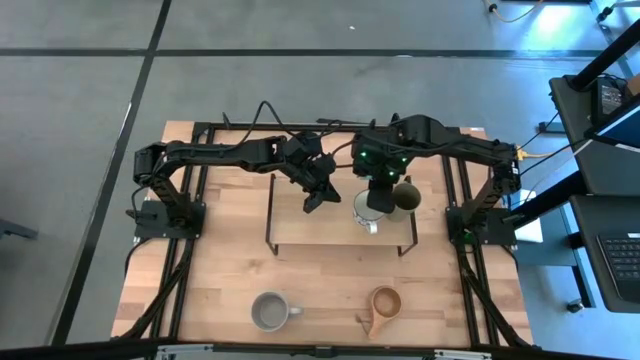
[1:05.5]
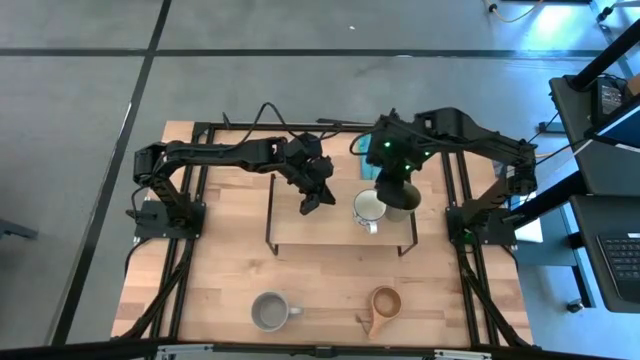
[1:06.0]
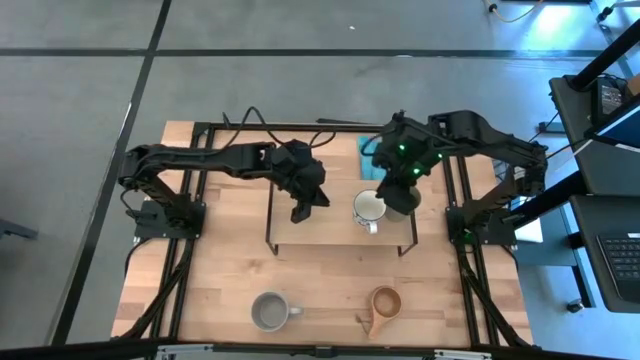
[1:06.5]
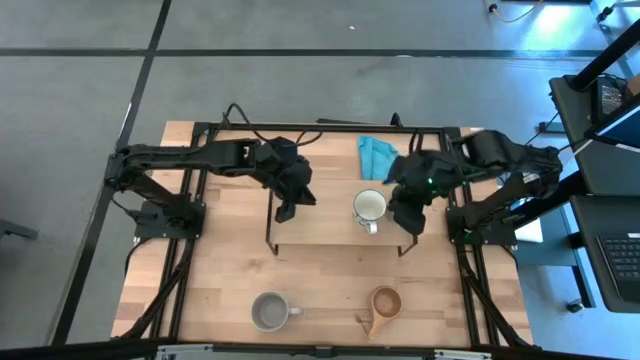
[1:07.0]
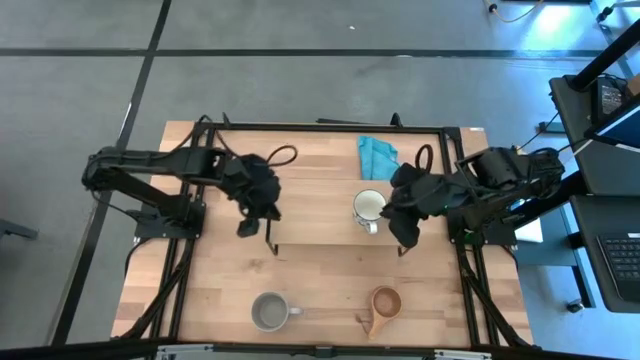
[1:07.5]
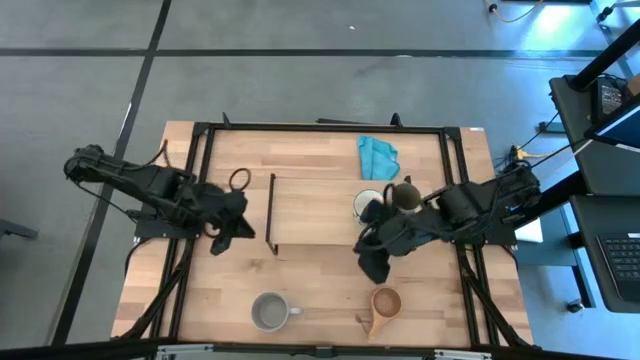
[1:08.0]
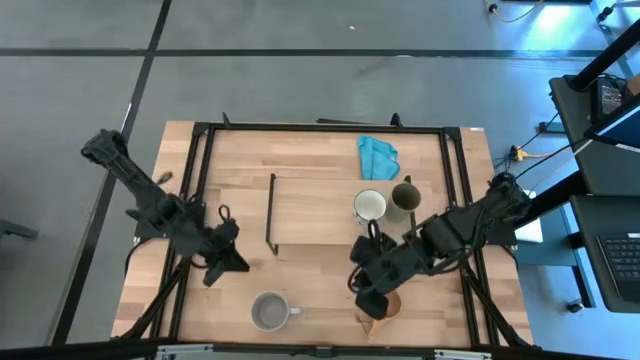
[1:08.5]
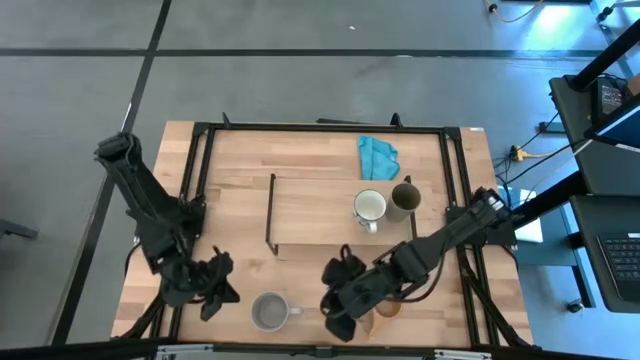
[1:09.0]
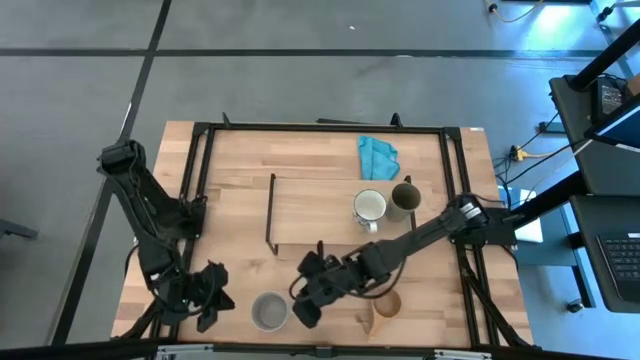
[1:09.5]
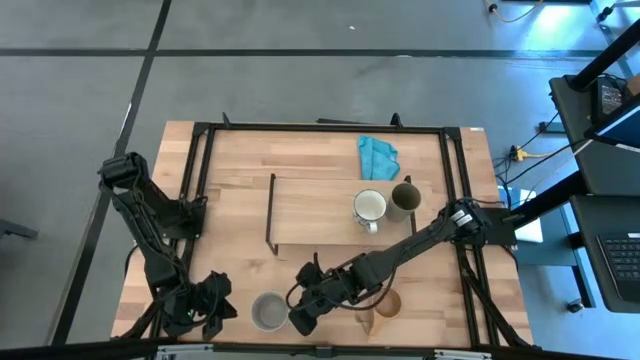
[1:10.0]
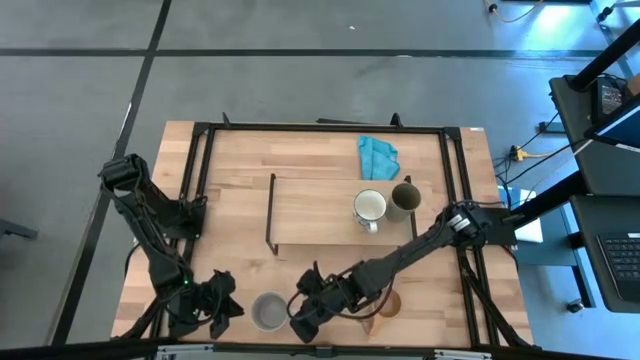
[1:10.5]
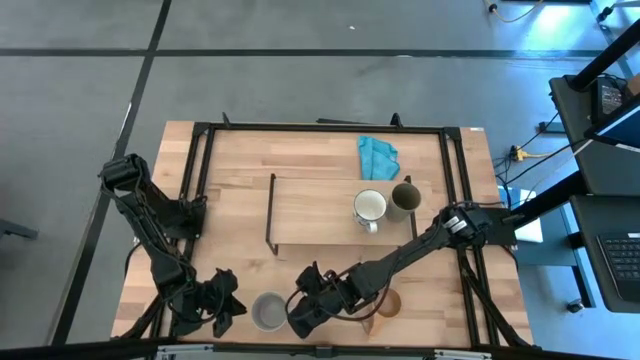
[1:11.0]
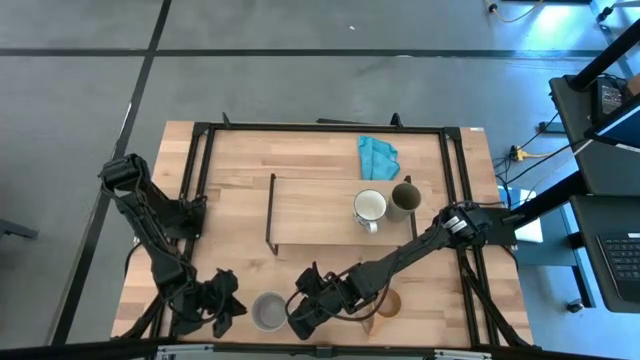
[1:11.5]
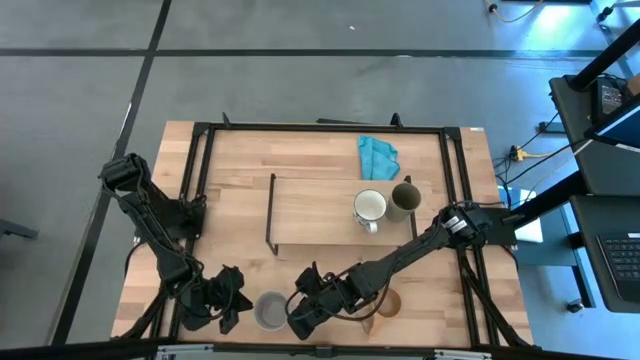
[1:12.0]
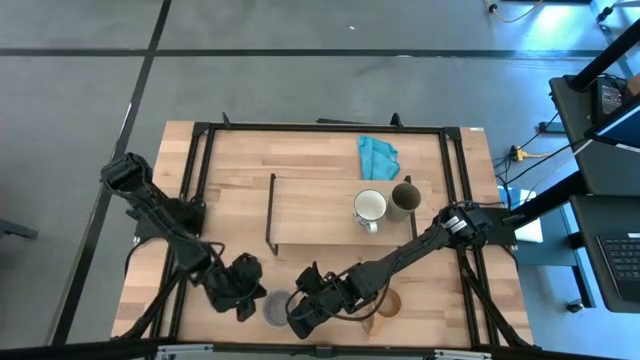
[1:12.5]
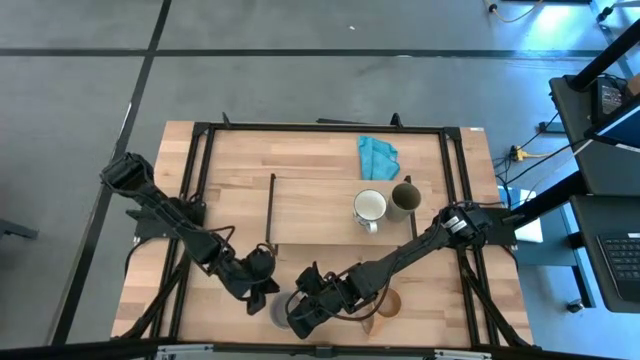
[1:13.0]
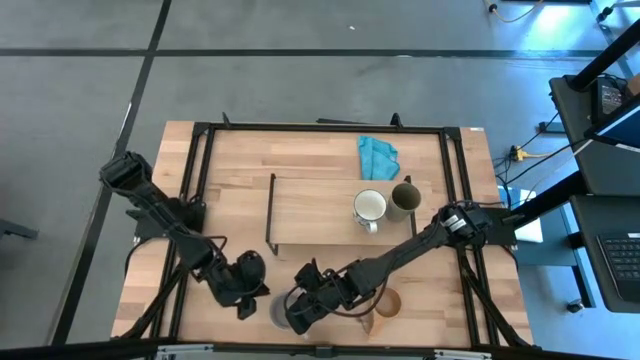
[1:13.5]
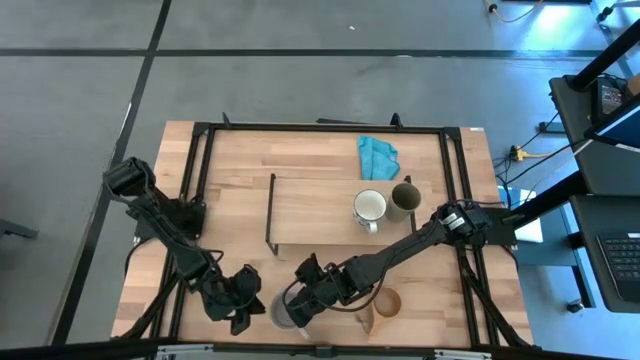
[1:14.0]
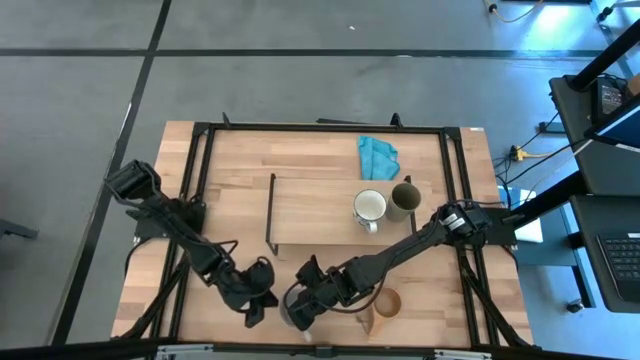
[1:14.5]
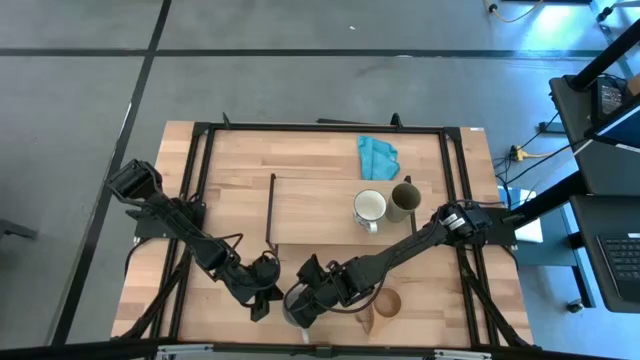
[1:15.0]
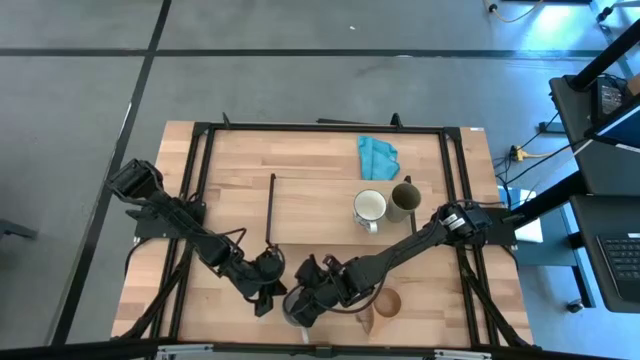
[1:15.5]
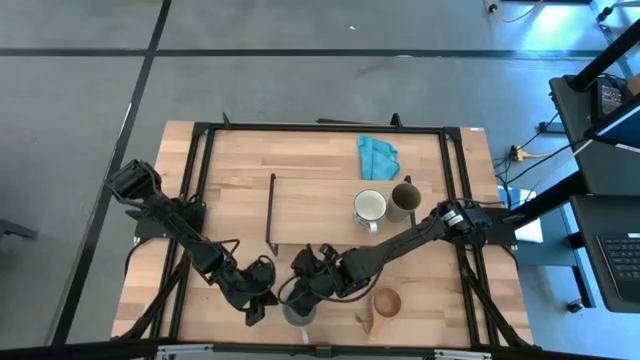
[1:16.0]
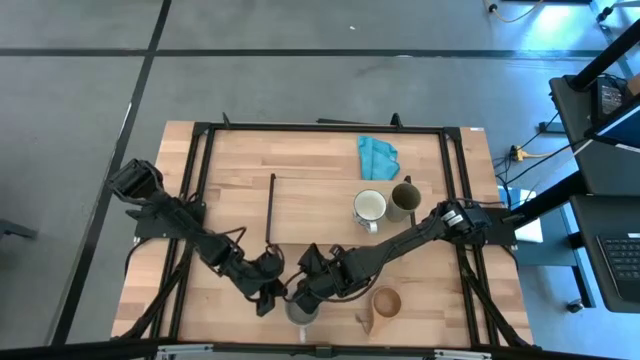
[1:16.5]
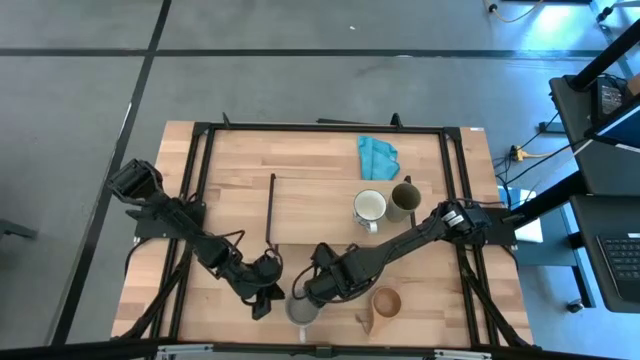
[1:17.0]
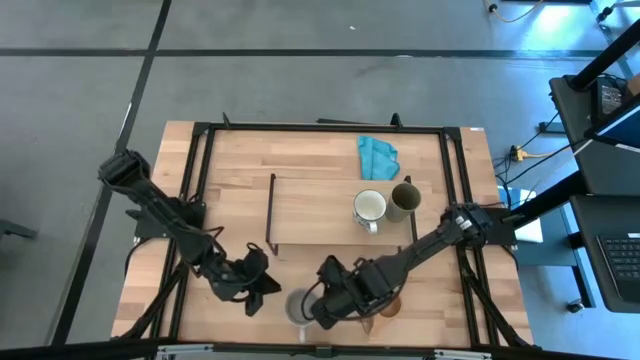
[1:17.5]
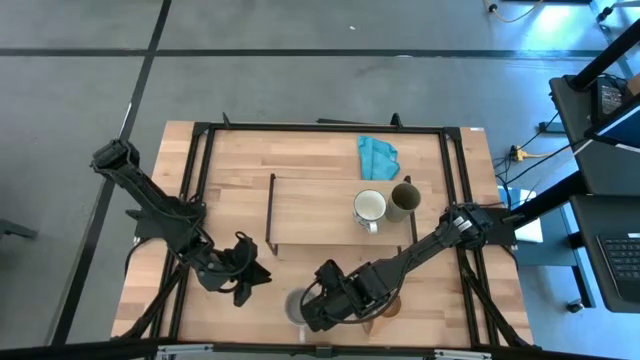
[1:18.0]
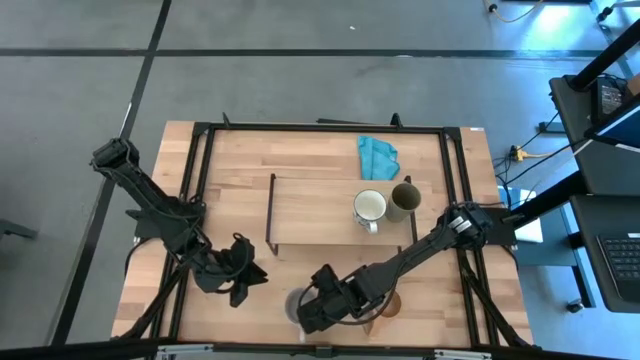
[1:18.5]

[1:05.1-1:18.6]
Task: Stack small to large cups/mugs on shelf
Put the gray mug on the shelf

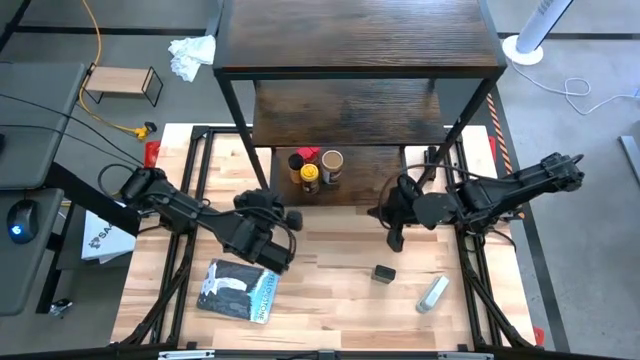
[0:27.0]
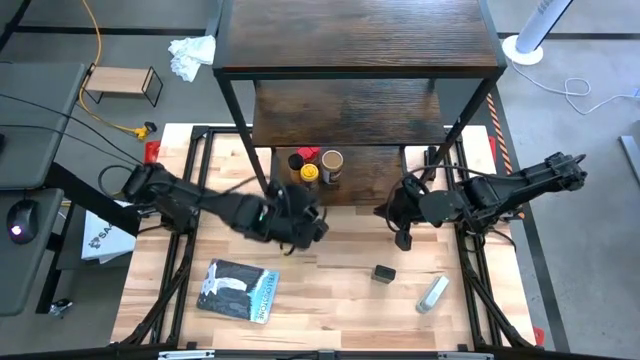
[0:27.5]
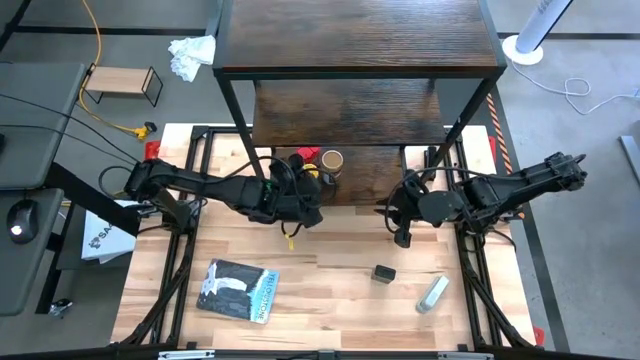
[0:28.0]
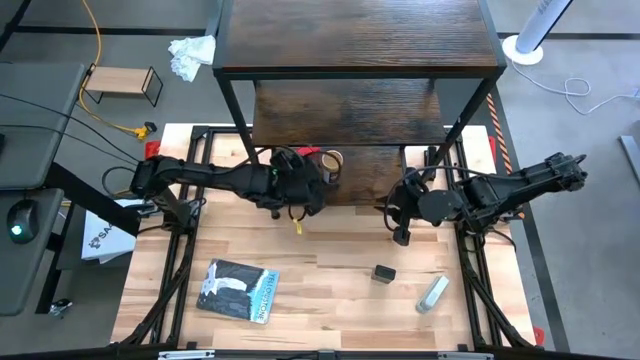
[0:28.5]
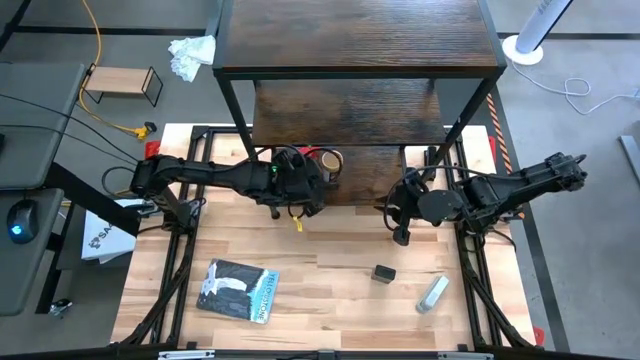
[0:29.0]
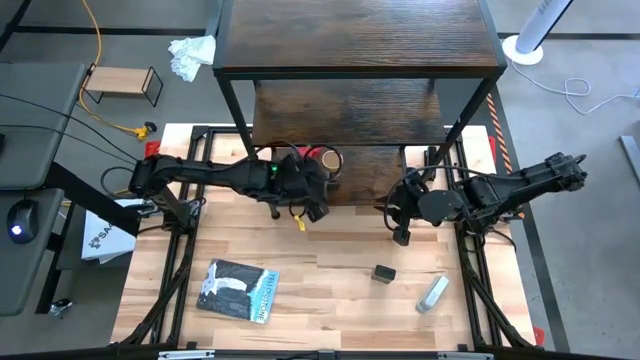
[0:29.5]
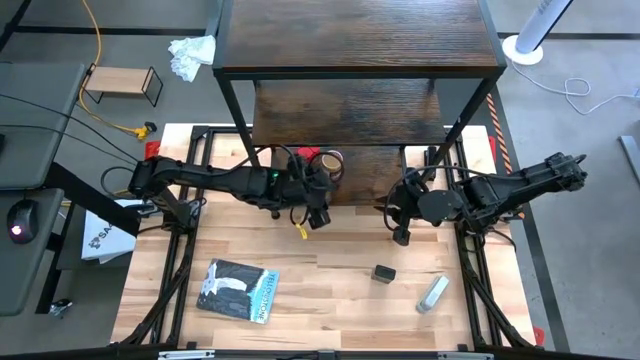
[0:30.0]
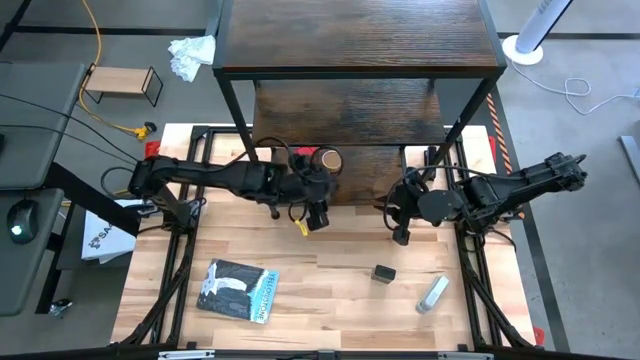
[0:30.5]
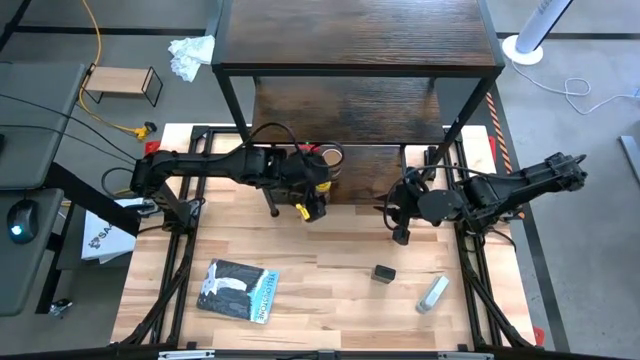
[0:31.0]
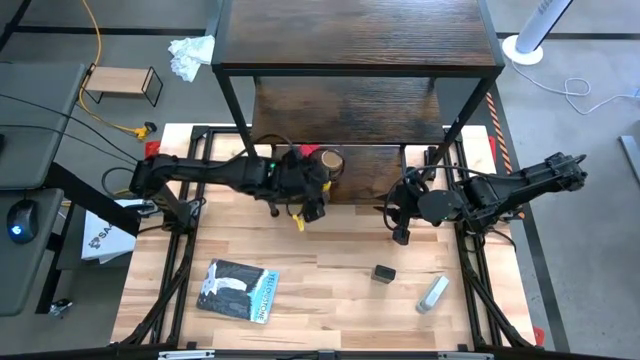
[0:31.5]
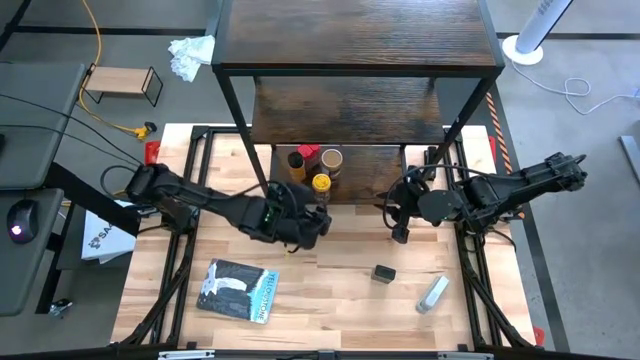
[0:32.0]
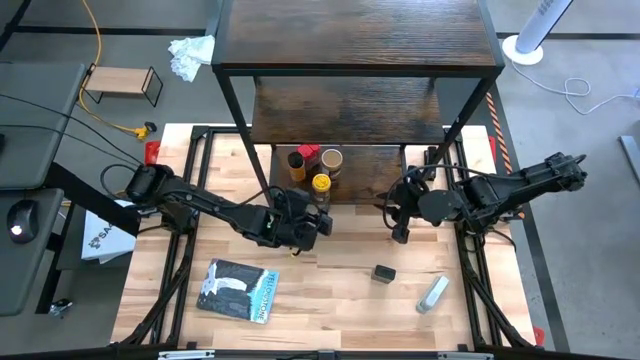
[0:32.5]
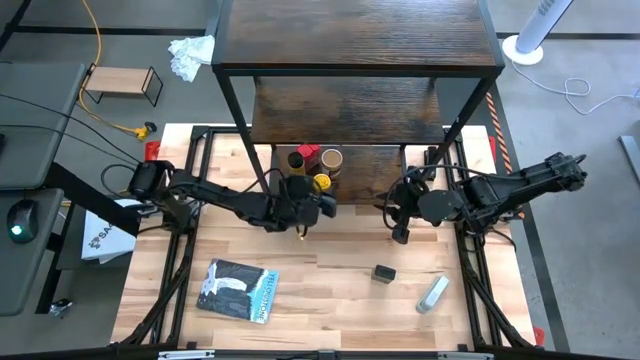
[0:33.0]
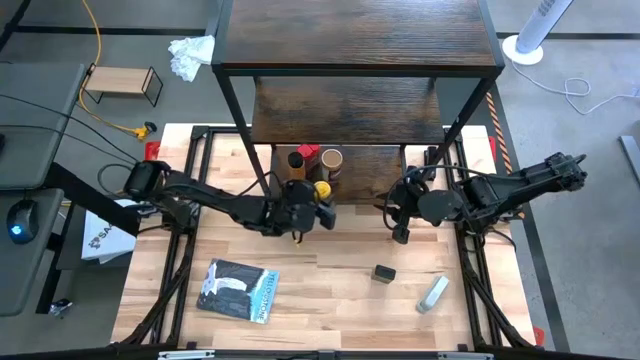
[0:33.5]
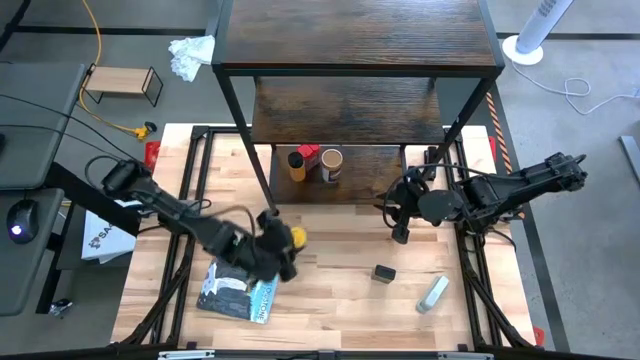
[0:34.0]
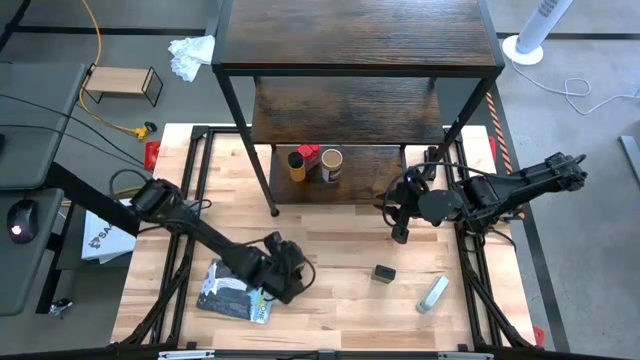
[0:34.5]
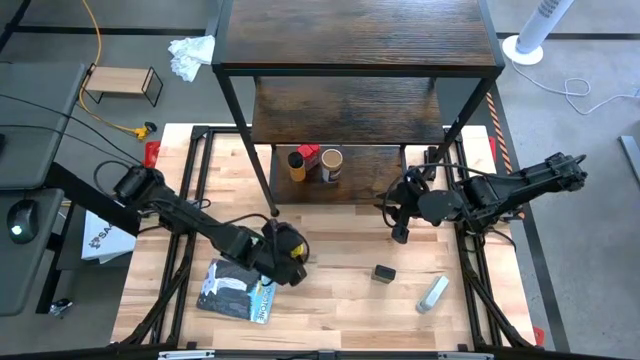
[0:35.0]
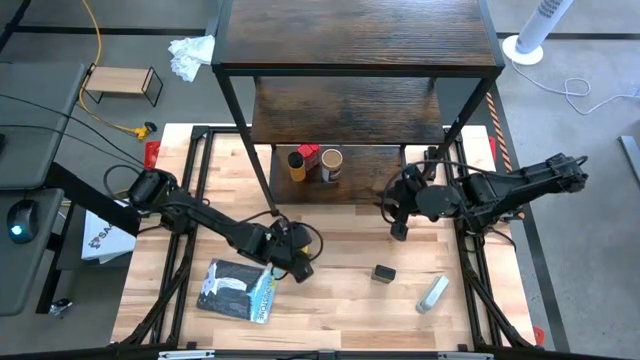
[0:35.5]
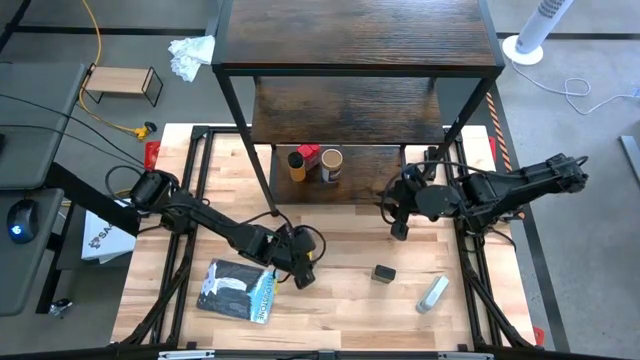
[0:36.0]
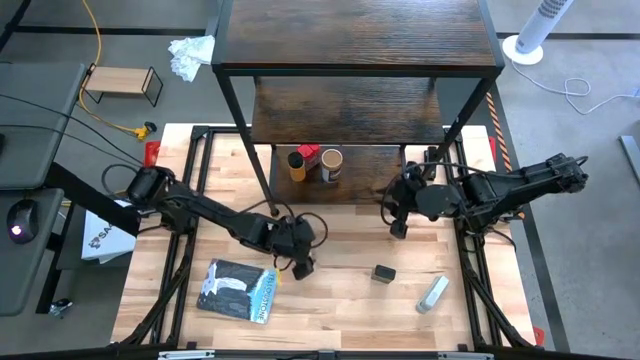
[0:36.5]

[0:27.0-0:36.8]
Task: Shelf spices
Remove the yellow seasoning bottle from the shelf
